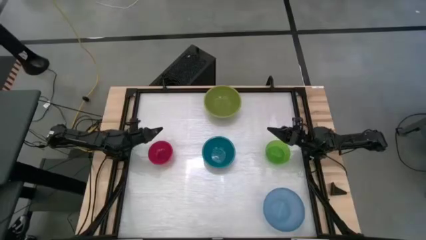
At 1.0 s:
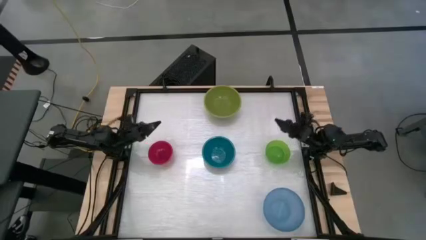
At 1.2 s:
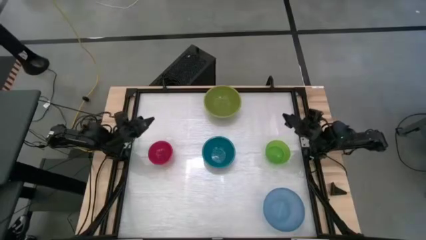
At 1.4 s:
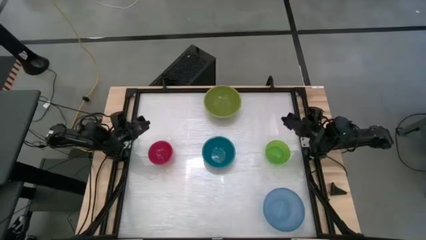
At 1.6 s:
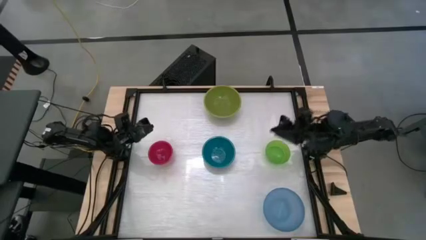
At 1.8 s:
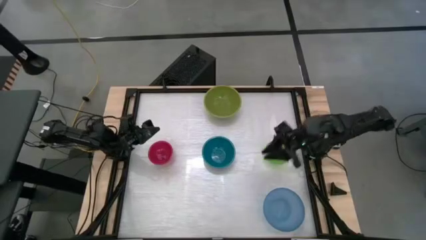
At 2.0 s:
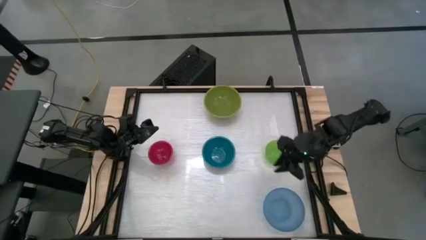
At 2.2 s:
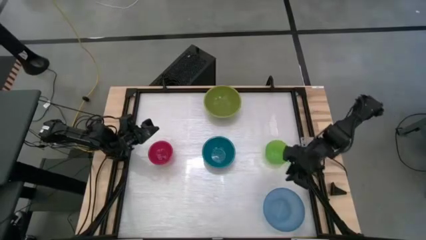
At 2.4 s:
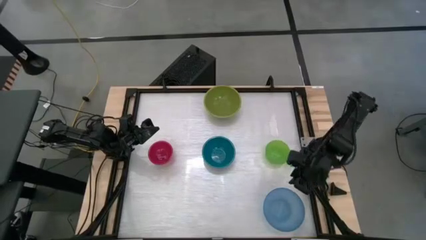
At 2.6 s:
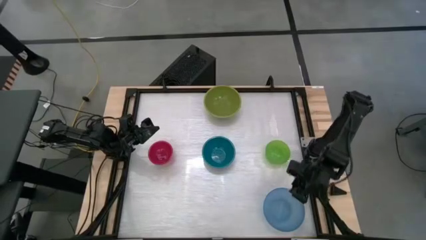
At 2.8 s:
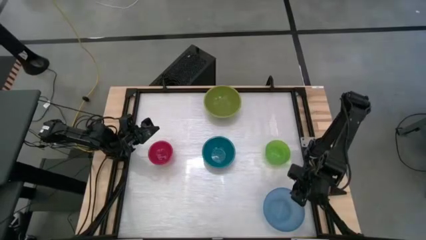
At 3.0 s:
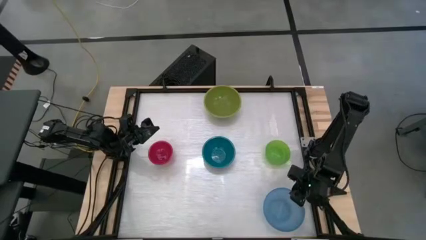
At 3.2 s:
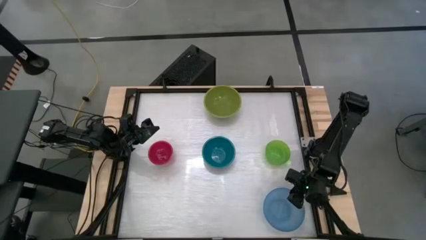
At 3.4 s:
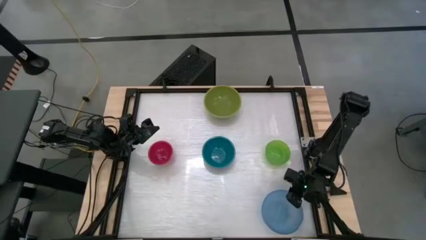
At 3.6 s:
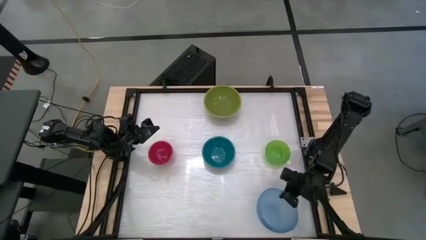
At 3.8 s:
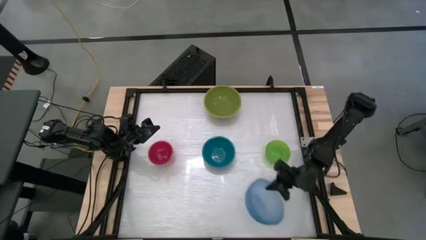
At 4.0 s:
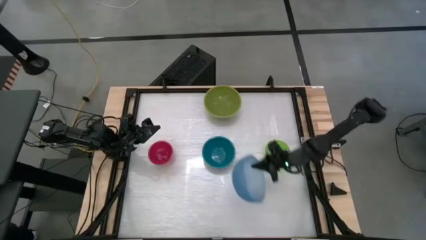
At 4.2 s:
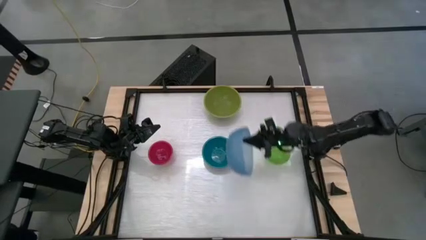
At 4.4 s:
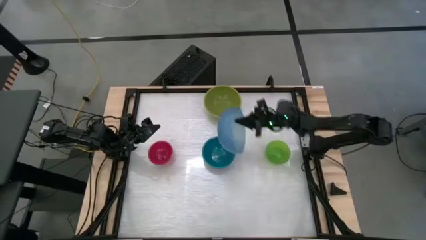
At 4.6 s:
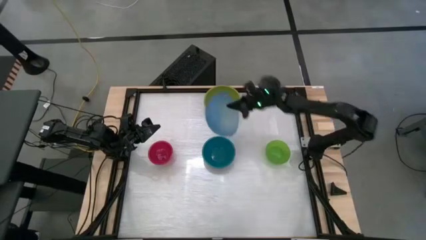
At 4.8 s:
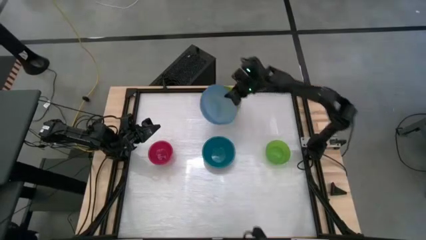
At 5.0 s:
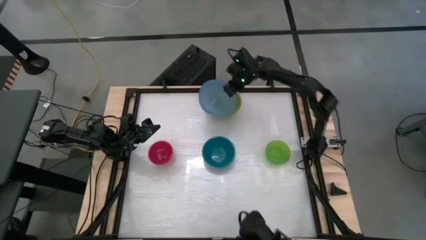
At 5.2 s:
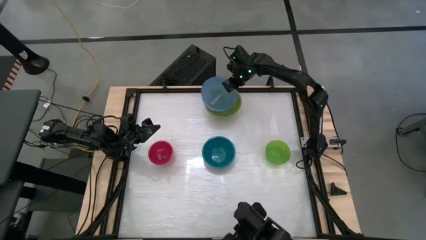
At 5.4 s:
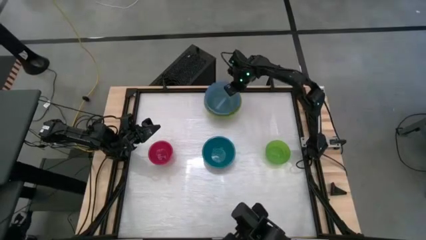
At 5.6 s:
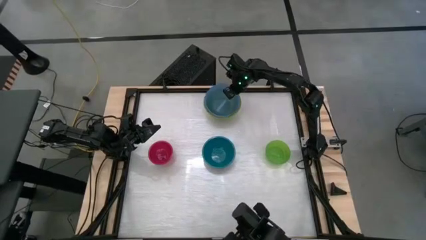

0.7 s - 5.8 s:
Stack the light blue bowl on top of the green bowl

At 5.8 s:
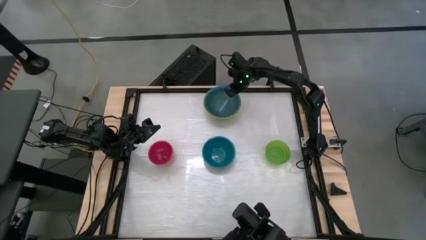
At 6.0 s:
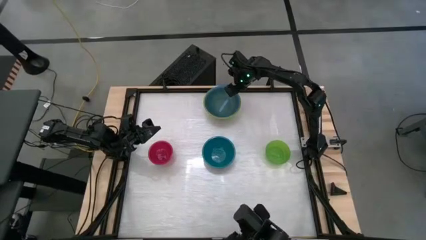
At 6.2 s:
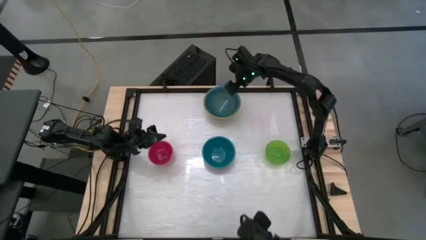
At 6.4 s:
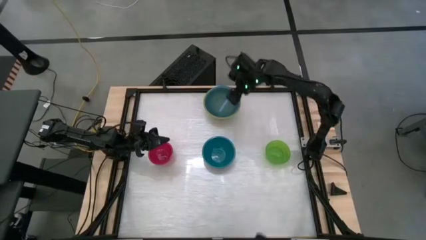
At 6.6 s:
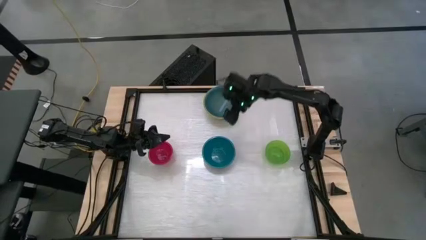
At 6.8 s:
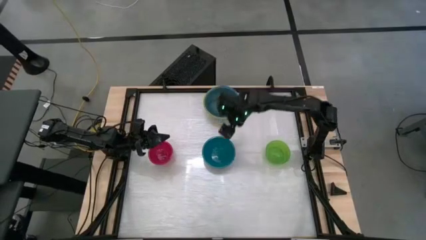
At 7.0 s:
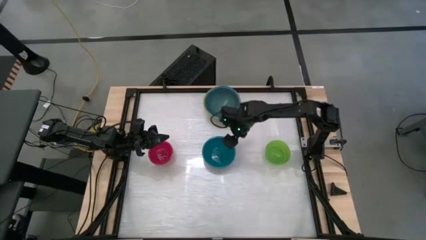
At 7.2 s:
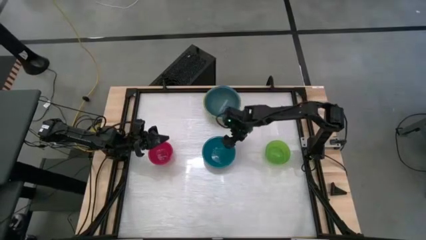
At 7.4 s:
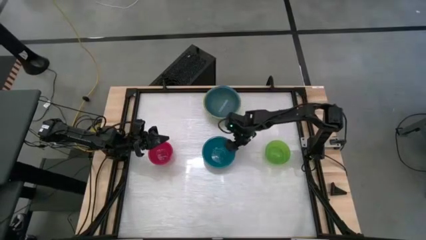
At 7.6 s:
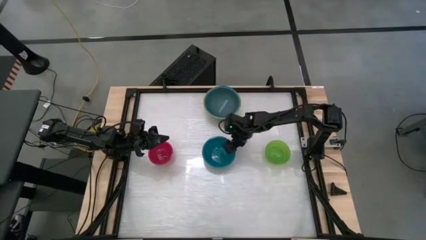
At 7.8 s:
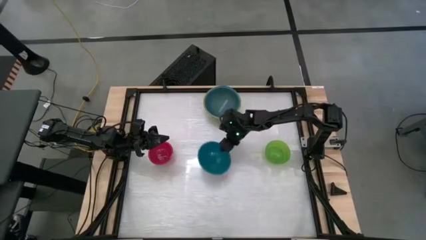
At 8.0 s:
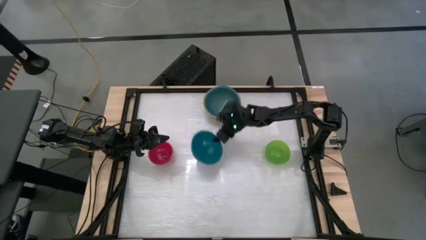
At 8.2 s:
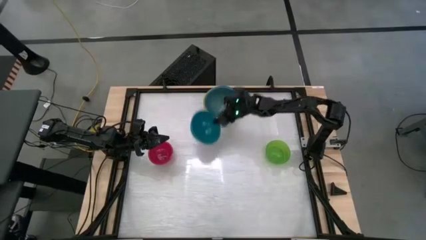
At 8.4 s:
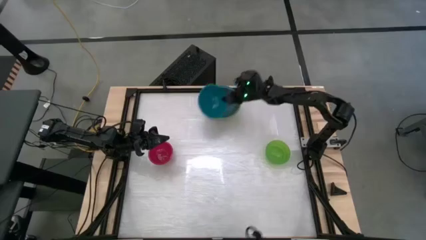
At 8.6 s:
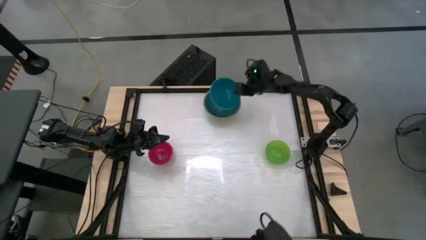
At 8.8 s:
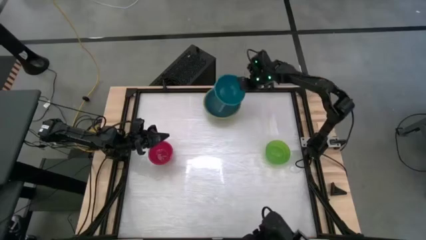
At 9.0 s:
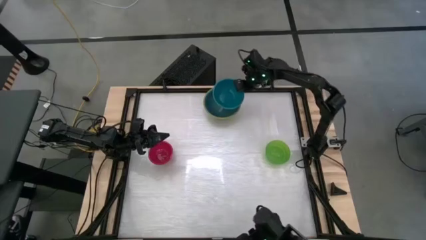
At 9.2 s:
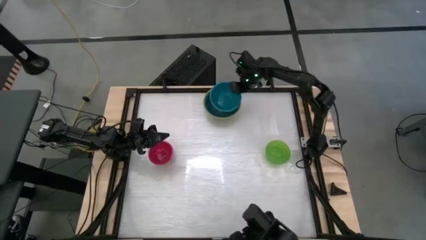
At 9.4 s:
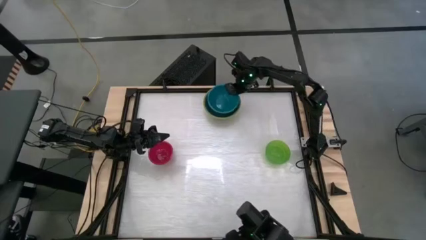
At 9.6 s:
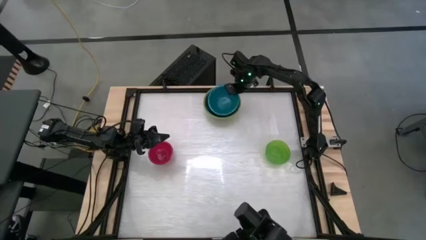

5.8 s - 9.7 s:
Stack the blue bowl on top of the light blue bowl

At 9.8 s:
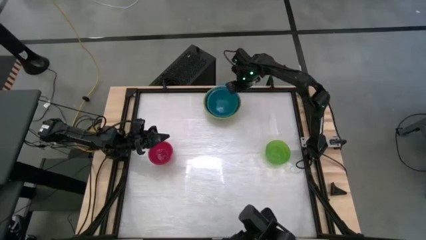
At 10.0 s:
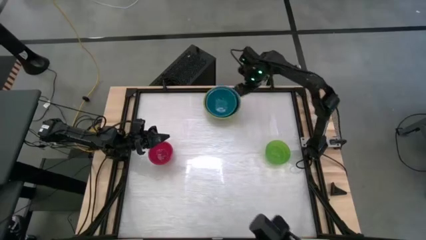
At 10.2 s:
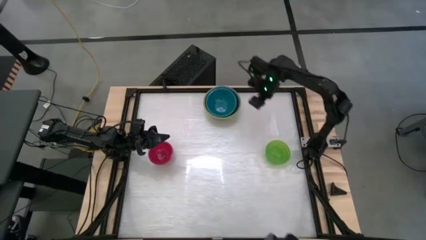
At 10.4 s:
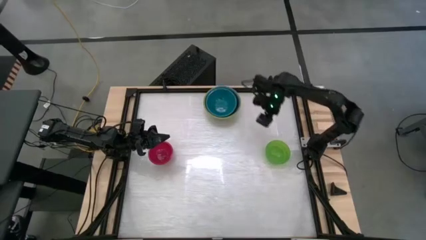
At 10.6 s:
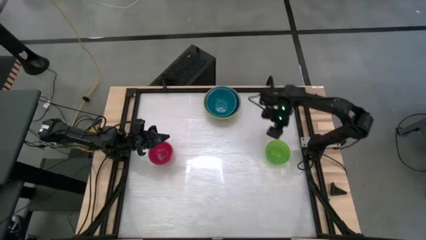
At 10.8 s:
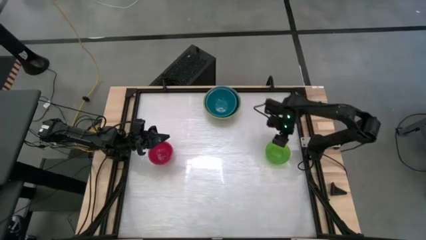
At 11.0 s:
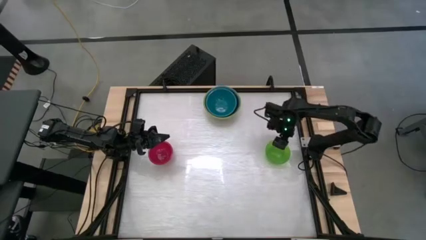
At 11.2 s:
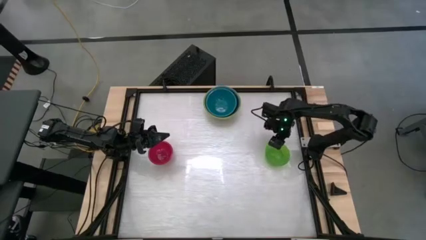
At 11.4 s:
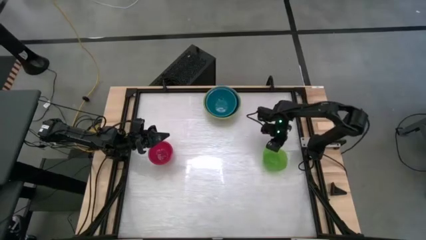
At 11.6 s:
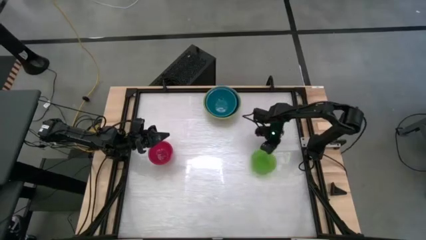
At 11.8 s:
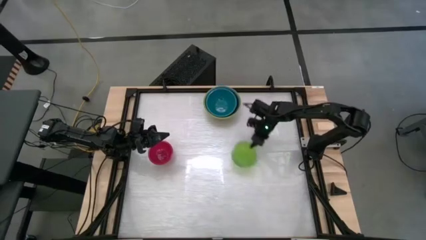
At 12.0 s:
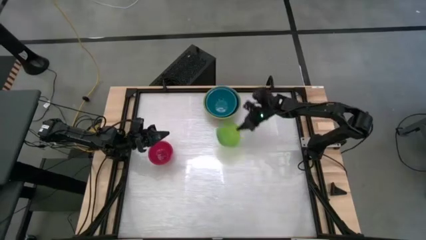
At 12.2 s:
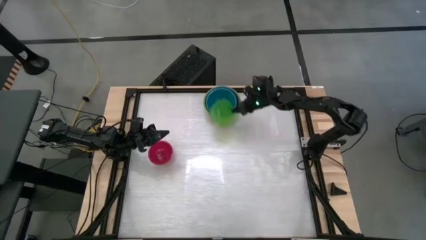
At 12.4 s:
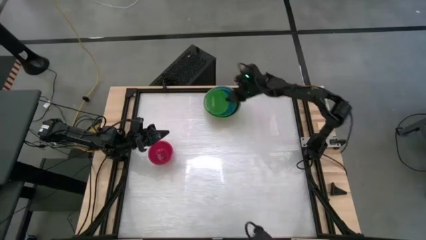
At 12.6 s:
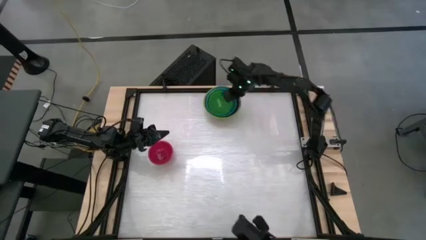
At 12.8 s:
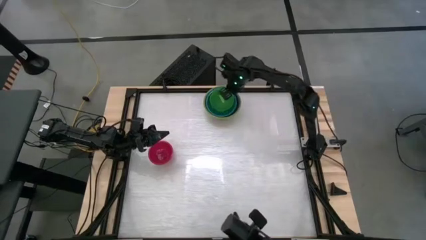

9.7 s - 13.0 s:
Stack the green bowl on top of the blue bowl

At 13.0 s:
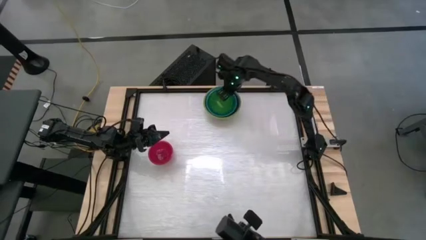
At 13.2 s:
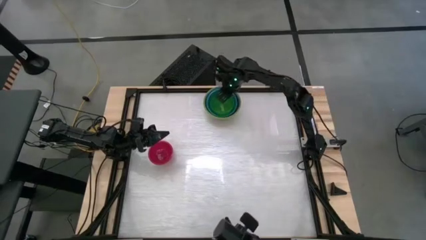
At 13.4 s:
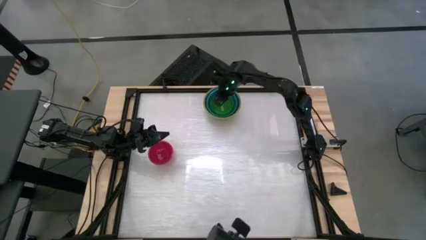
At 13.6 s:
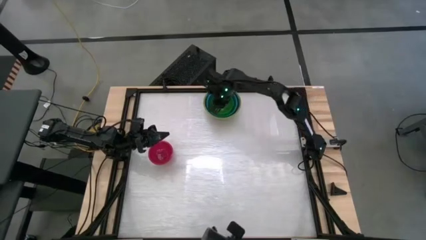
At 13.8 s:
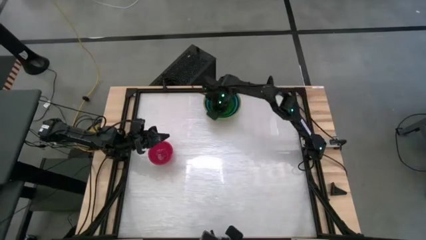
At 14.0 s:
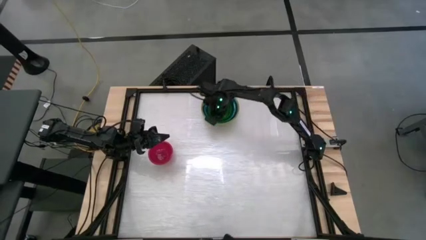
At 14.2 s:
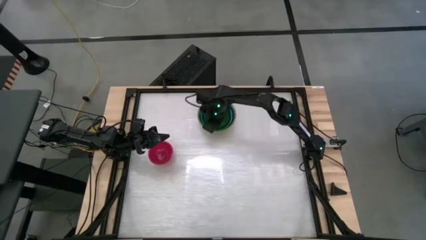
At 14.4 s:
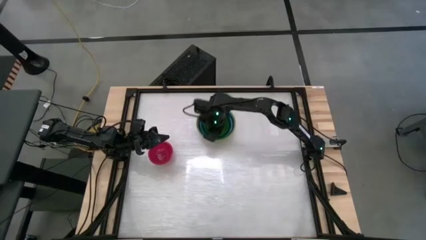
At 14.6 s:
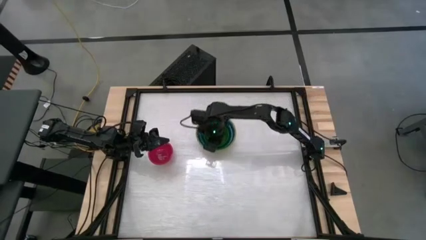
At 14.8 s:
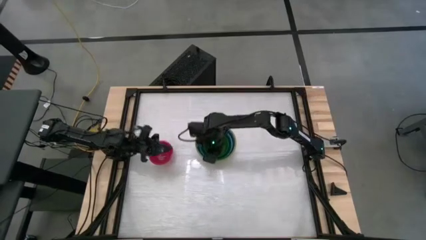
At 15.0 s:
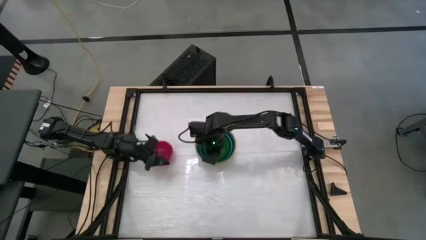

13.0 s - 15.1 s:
Move the stacked bowls to the center of the table

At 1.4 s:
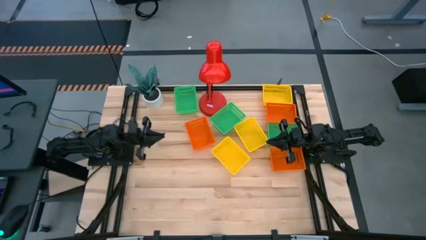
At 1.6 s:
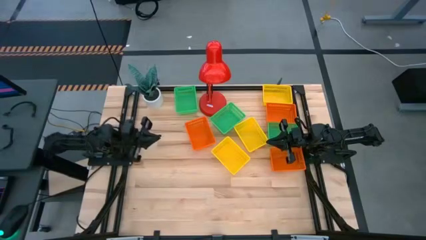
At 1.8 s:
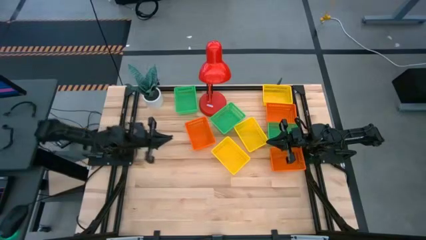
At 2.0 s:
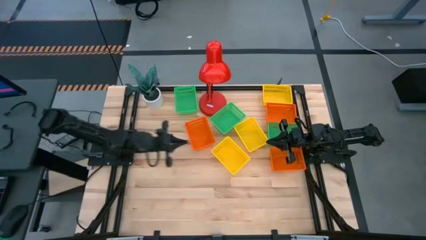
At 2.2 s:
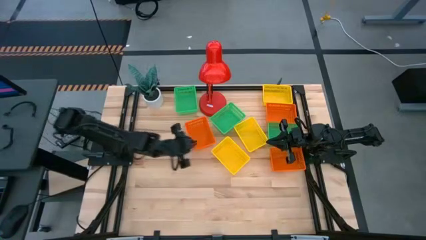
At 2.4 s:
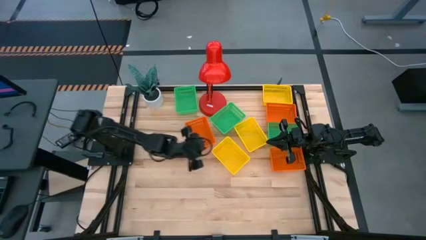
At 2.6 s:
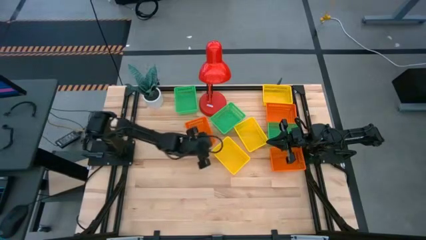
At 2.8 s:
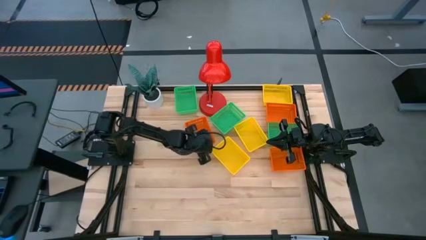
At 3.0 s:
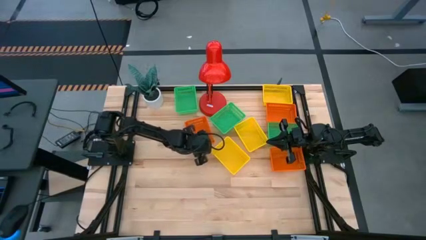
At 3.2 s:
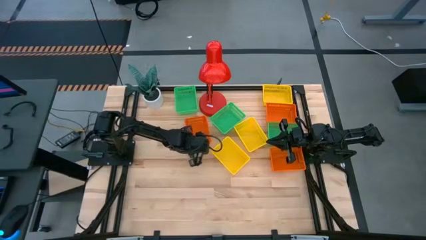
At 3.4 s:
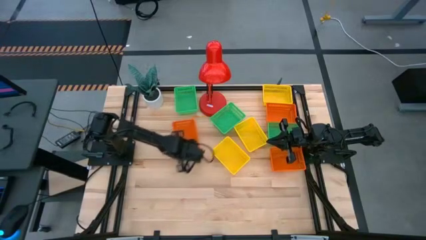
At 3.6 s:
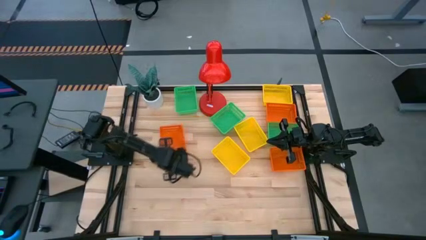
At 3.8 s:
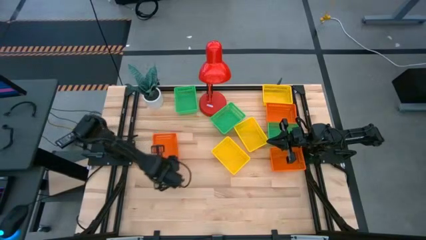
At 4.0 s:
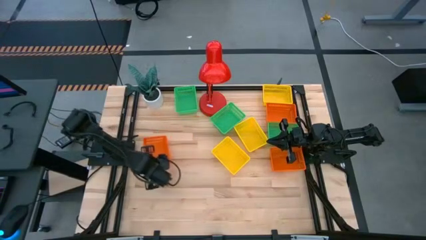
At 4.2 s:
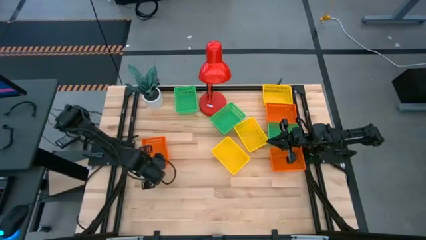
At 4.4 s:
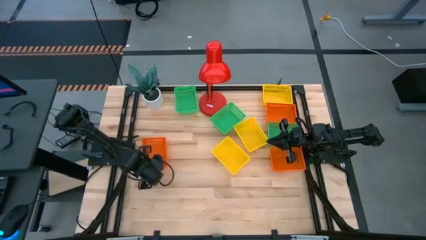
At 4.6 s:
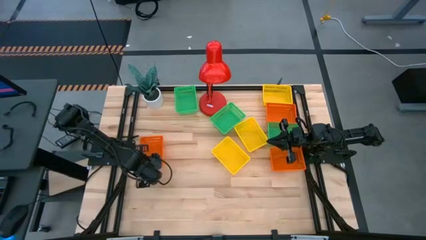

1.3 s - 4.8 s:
Move the left orange bin to the middle left of the table
